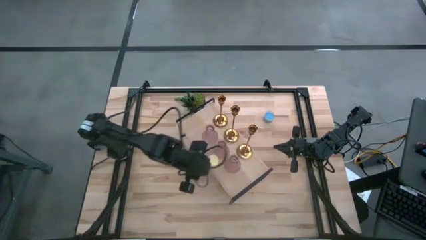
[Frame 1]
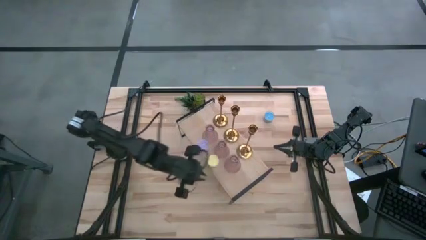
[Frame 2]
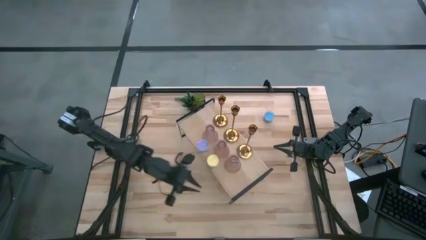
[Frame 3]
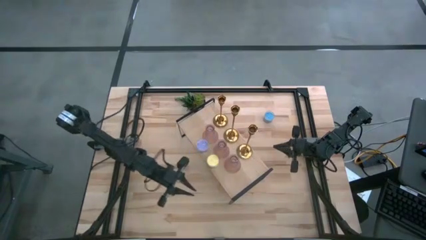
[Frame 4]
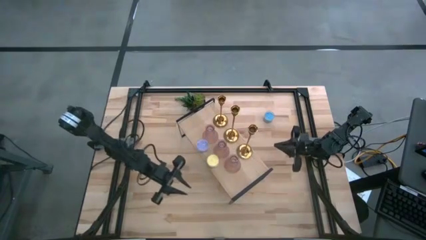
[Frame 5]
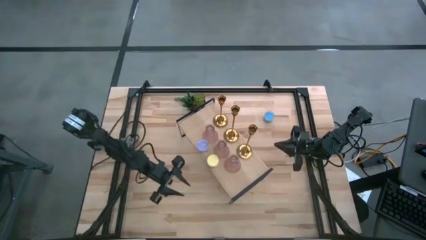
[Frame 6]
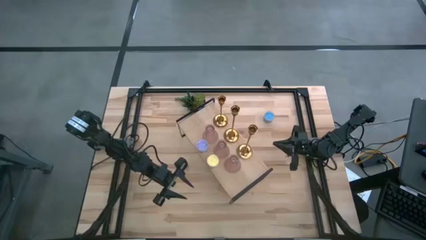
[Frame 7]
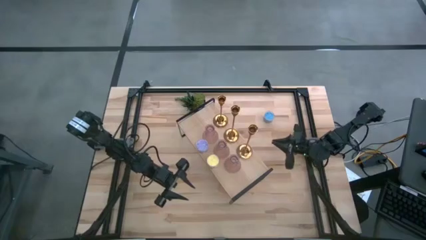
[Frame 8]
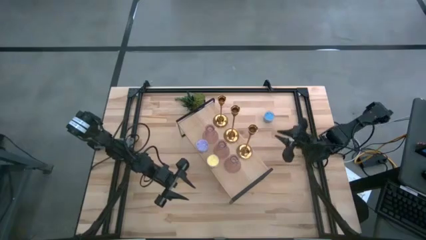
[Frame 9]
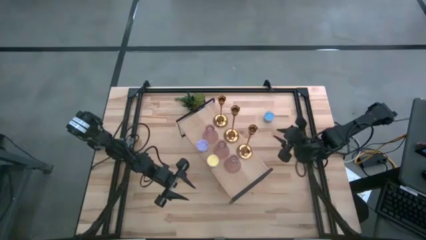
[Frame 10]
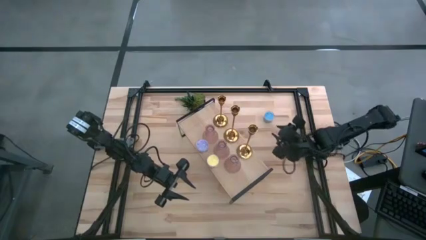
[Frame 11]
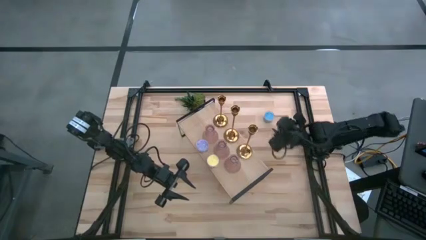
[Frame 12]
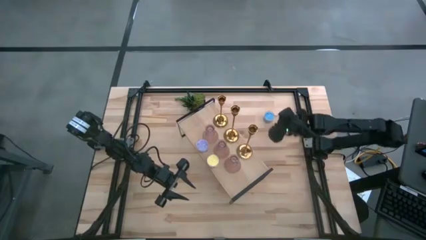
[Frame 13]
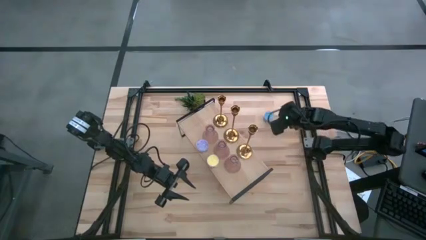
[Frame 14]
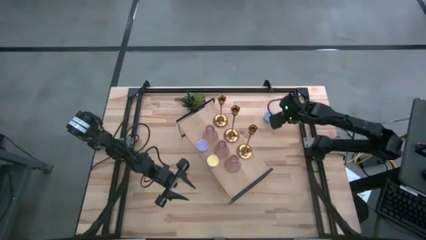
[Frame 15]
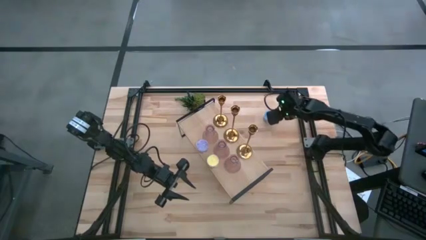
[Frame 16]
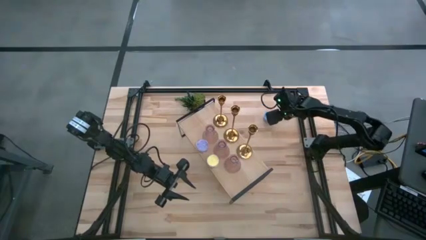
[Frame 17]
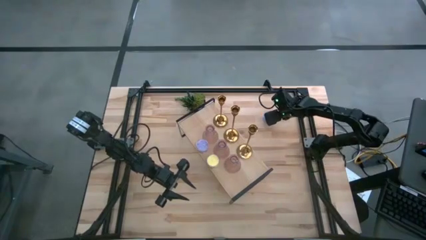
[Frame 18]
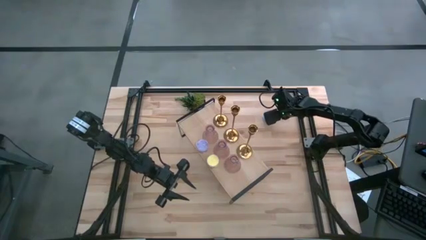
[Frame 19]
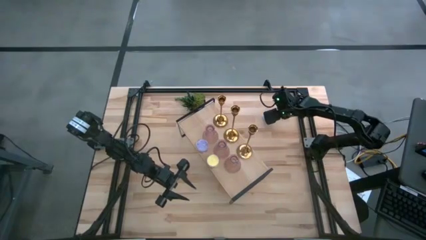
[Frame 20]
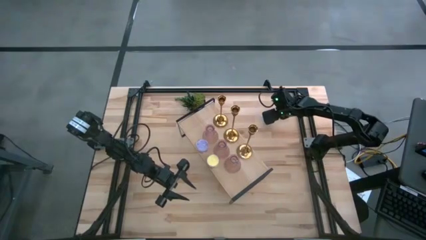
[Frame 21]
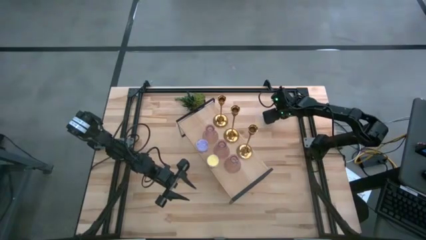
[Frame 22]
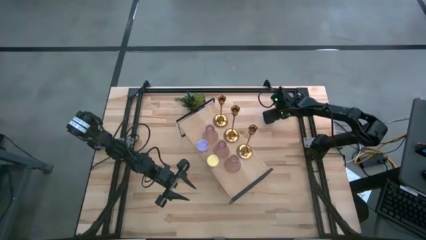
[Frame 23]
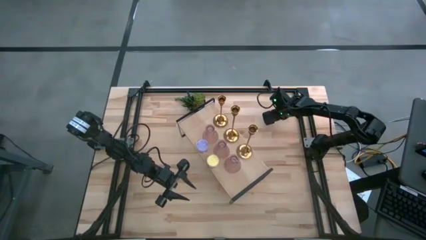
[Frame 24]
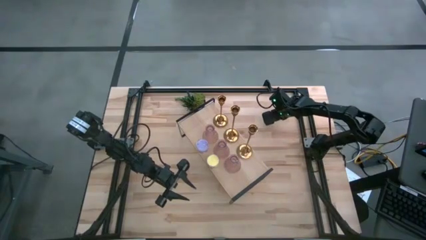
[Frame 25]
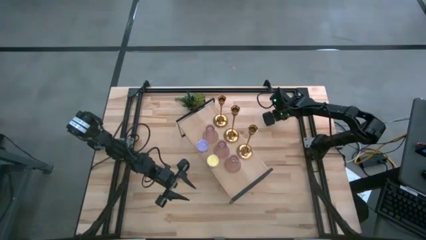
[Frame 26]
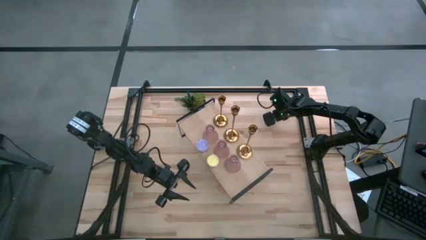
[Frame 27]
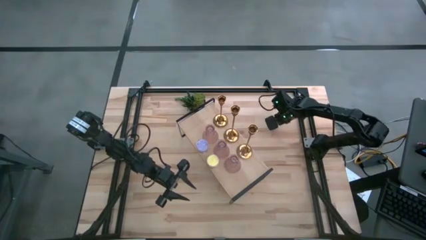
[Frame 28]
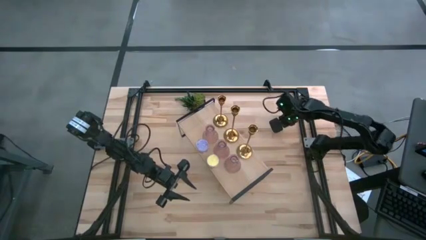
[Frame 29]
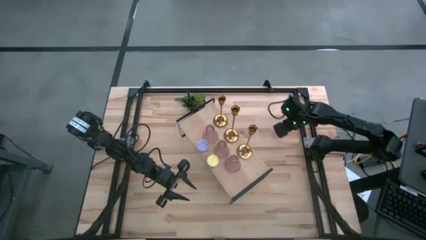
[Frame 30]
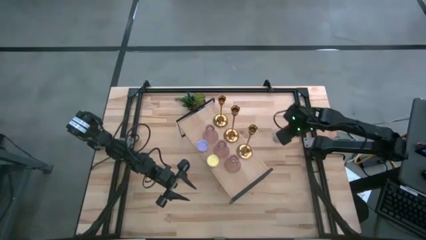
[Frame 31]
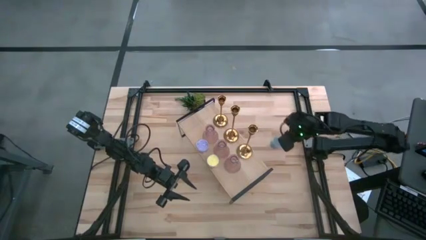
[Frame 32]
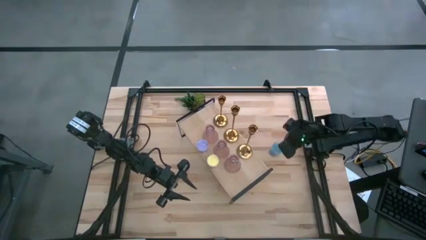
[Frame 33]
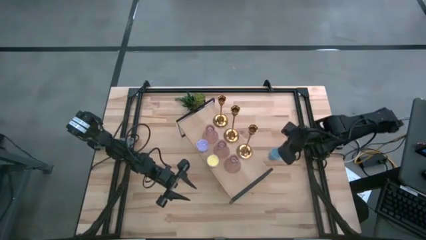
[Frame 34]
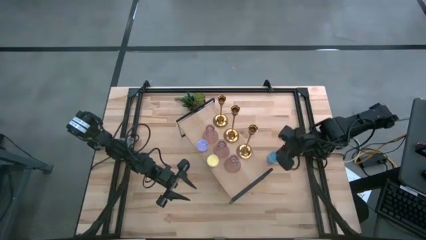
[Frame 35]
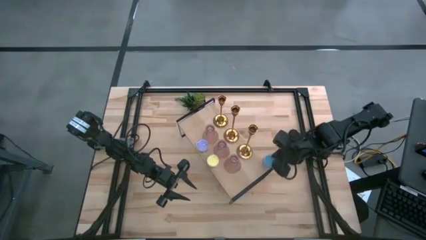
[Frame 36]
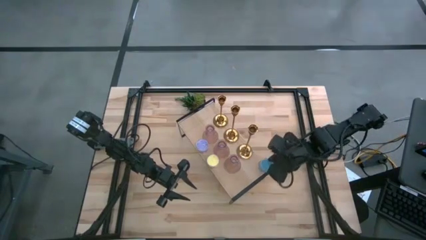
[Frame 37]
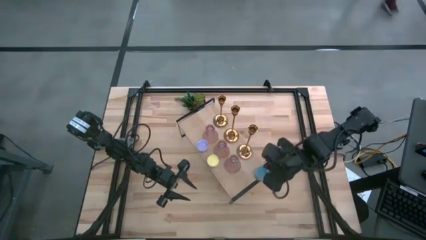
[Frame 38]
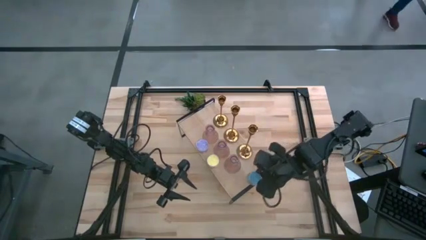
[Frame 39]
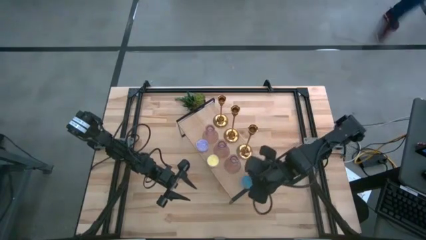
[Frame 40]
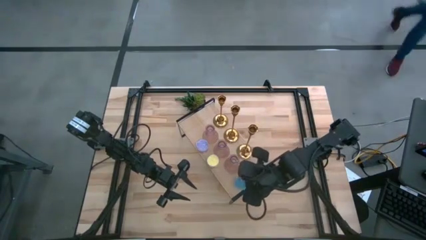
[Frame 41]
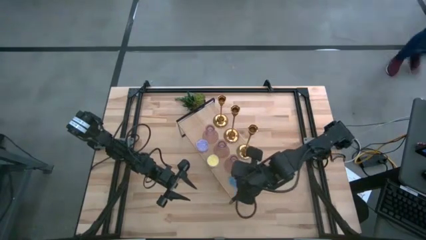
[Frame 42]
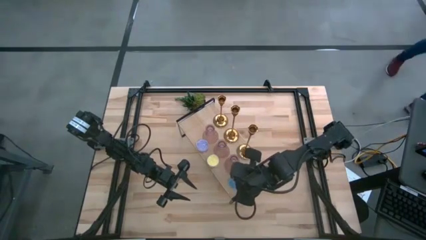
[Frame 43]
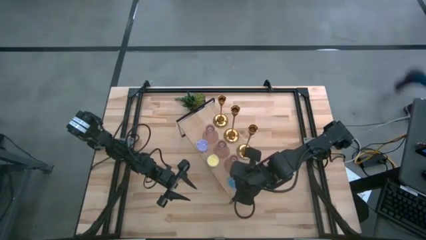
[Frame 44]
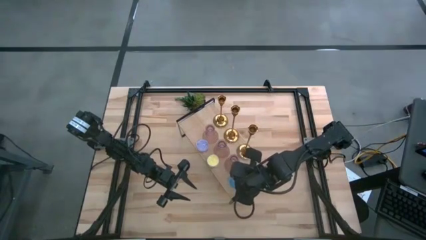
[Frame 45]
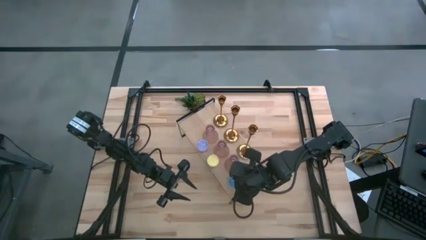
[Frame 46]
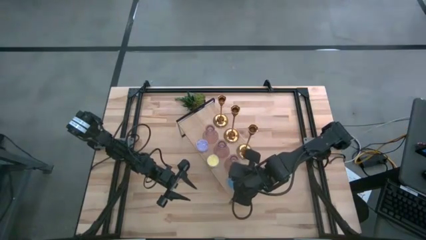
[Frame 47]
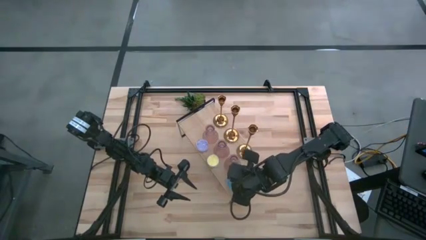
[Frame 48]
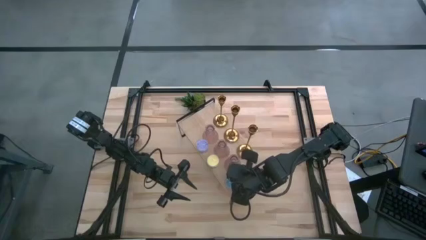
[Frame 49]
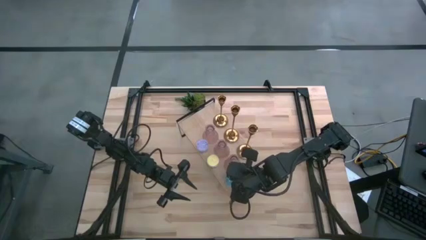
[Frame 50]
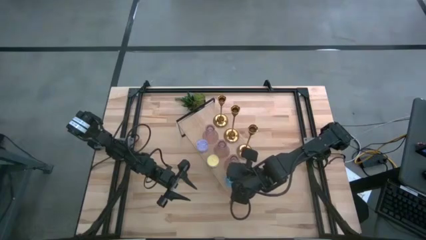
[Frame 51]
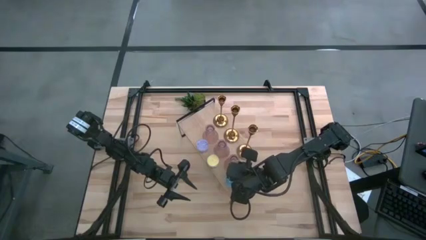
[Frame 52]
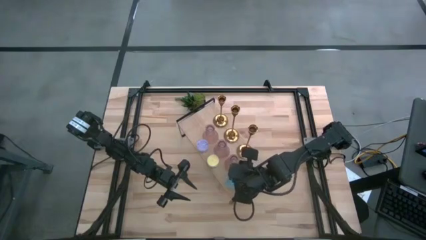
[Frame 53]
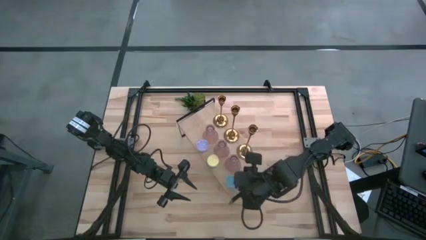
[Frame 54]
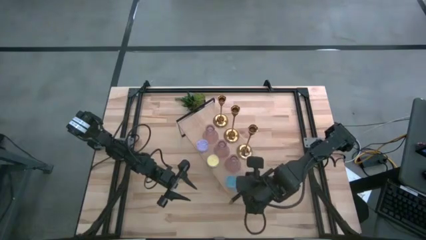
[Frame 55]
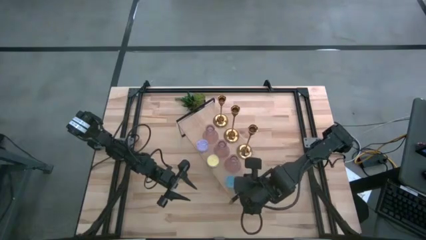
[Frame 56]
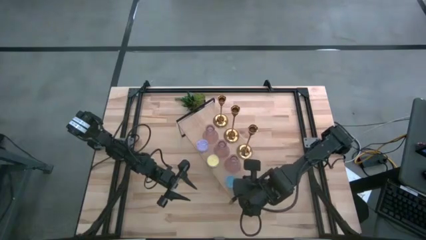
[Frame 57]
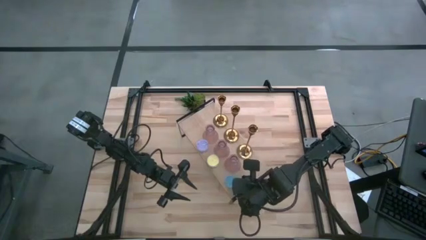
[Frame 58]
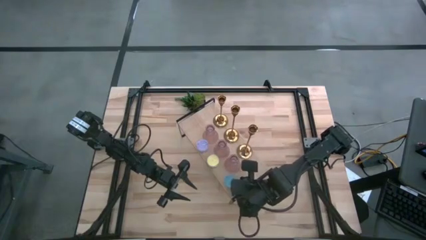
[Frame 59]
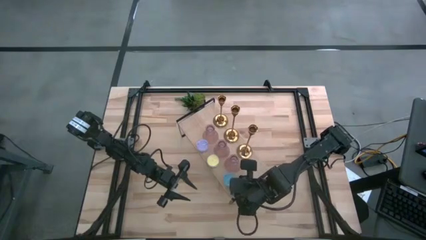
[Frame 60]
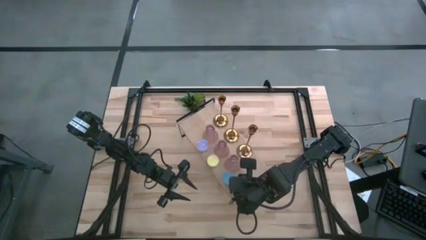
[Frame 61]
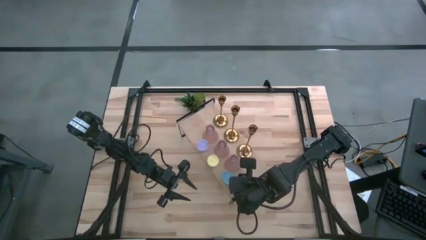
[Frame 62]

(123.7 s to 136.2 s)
Task: Pick & Place candle stick holders
Put the blue scented candle on the shelf aligned with the yellow scented candle

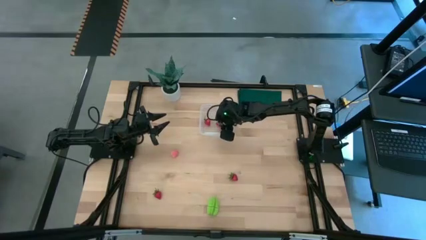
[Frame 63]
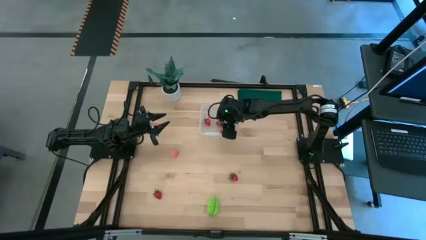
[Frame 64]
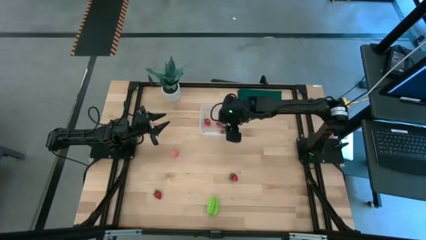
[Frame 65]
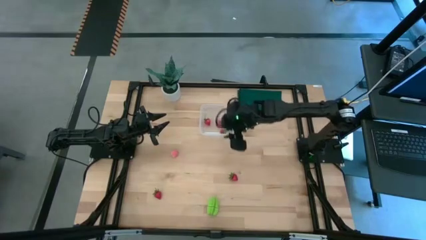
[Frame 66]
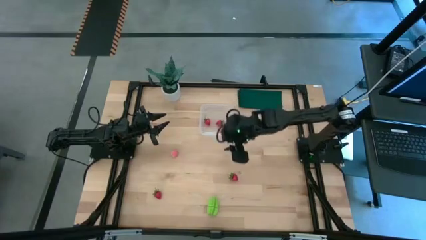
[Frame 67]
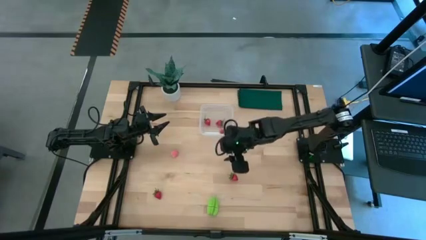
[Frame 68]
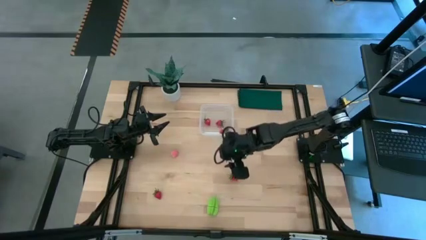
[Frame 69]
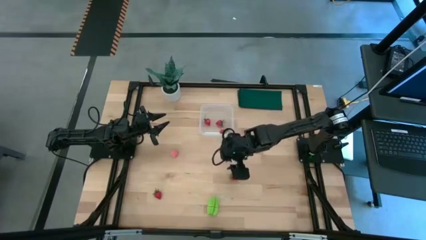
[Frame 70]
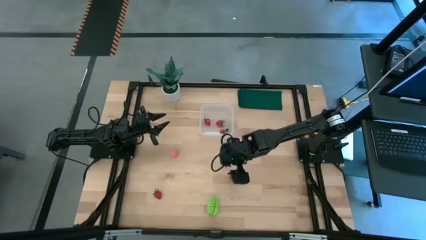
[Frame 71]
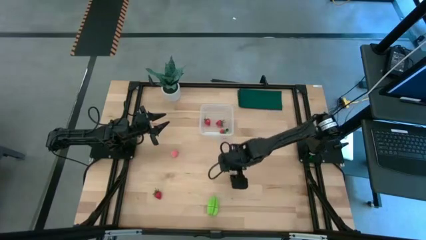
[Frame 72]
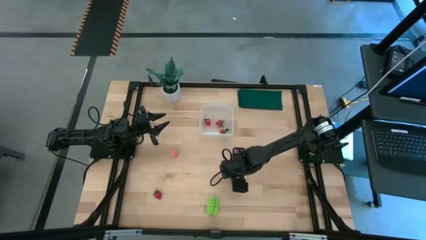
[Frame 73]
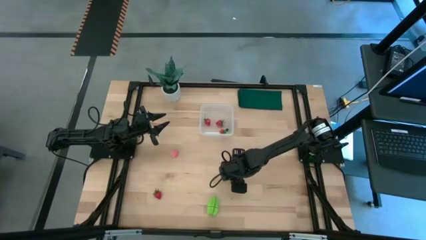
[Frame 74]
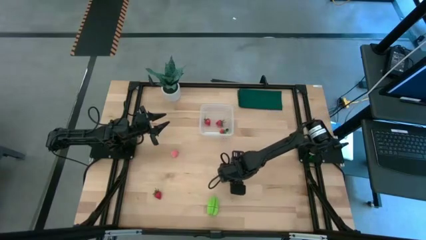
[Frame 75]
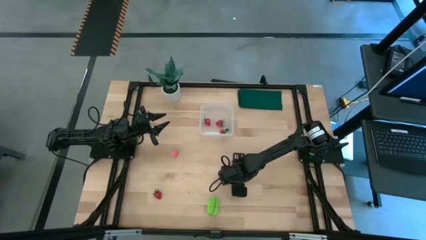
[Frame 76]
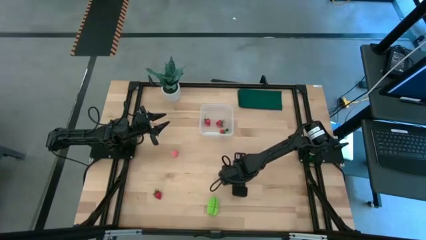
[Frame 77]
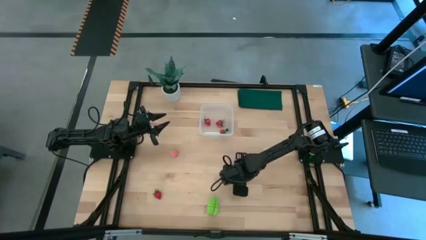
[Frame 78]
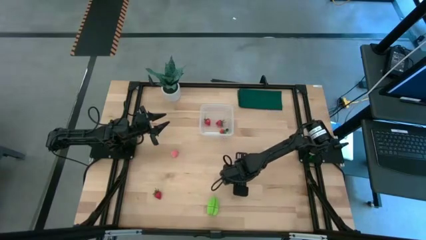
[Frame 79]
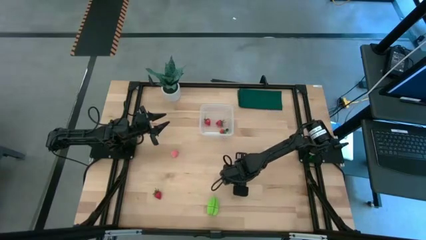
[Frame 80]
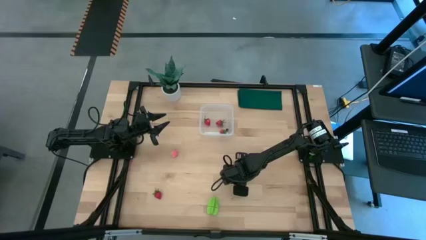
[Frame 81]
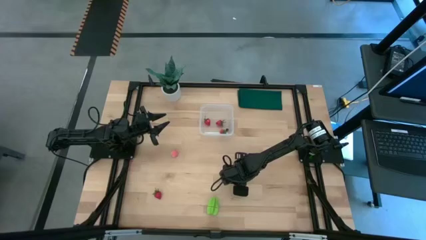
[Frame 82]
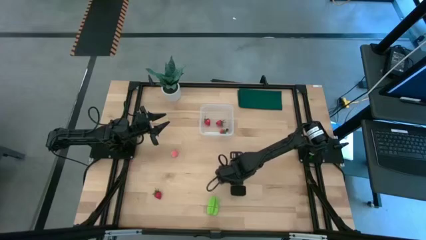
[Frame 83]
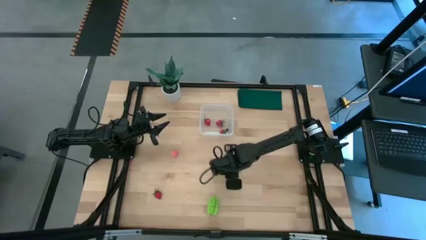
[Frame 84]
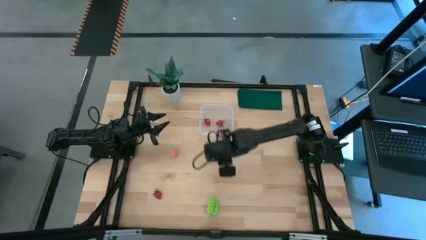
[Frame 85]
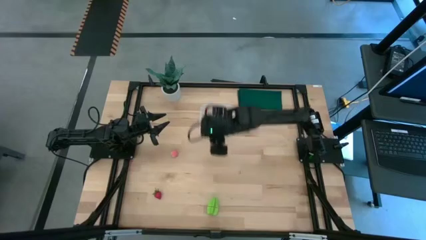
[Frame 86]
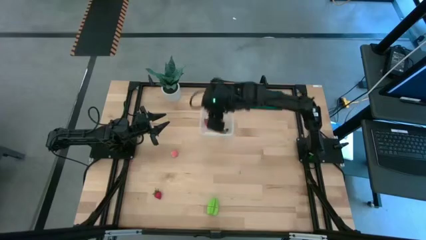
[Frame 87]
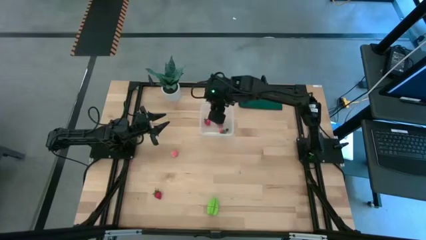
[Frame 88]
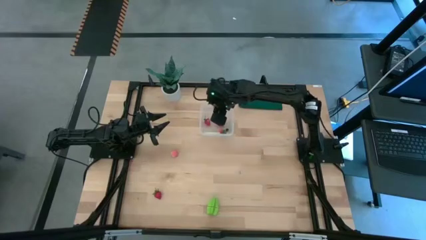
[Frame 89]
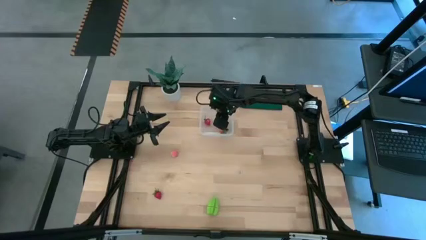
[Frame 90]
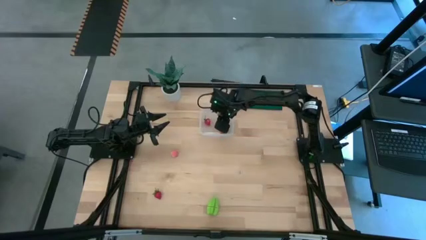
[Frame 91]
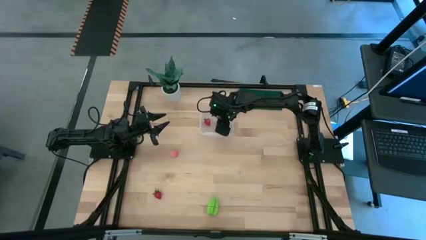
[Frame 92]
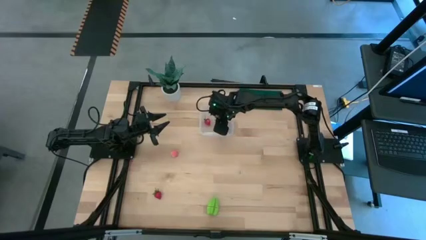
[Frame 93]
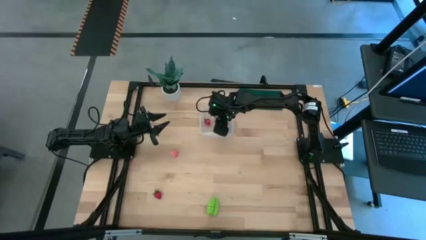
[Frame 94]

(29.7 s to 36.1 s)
Task: Pick and placing Produce into tupperware
Put the strawberry into the transparent container
